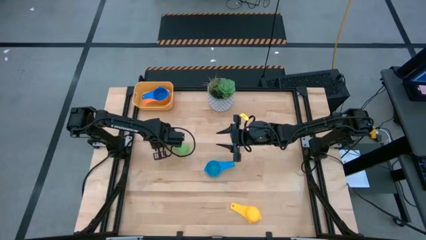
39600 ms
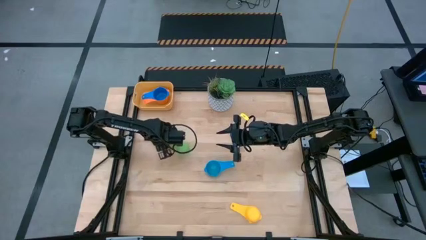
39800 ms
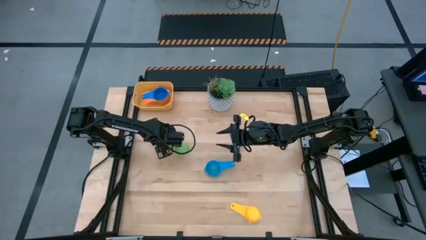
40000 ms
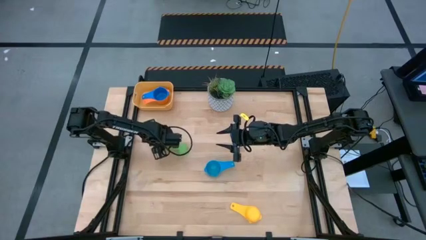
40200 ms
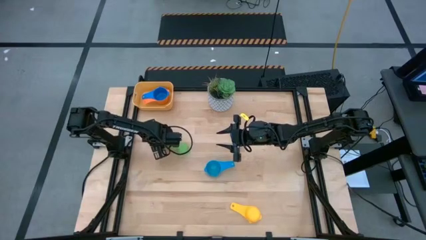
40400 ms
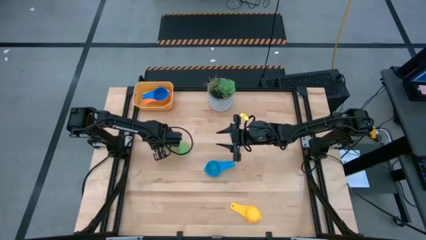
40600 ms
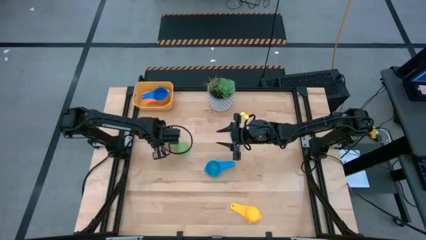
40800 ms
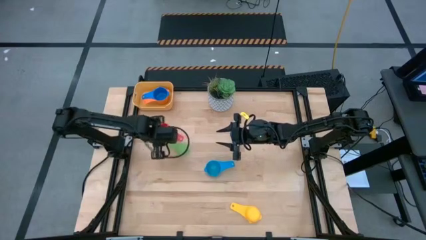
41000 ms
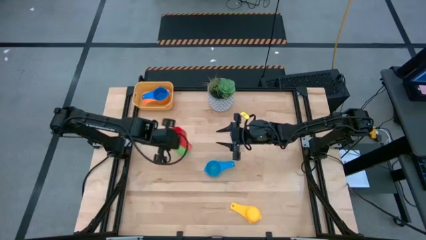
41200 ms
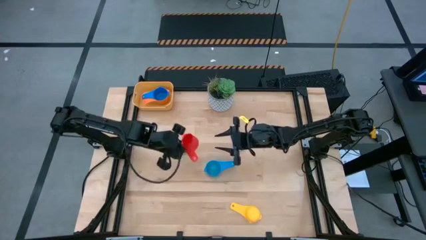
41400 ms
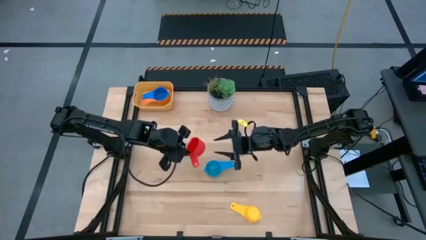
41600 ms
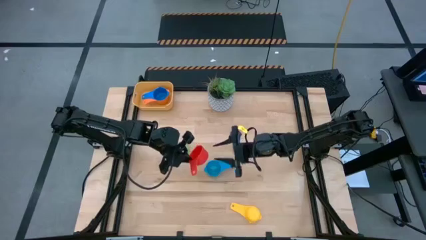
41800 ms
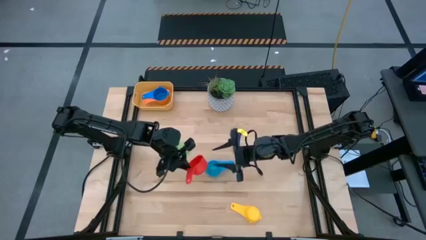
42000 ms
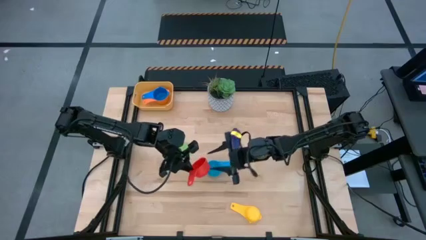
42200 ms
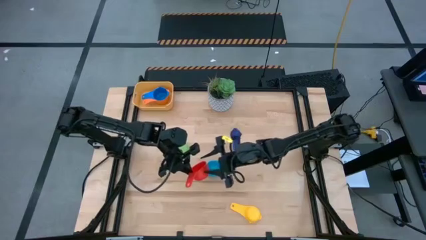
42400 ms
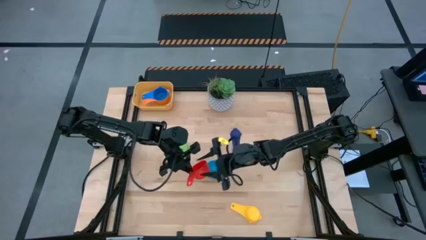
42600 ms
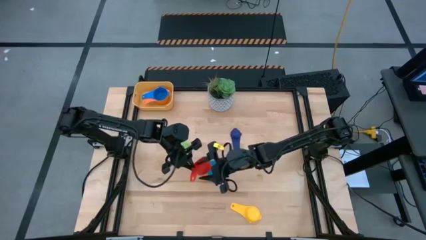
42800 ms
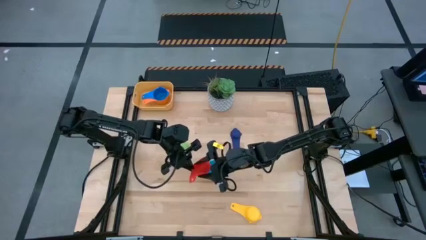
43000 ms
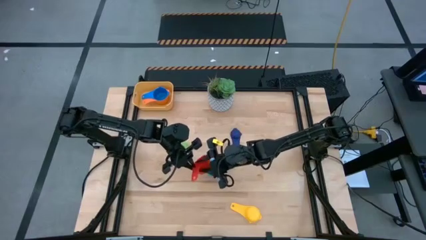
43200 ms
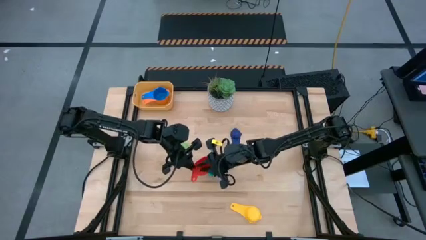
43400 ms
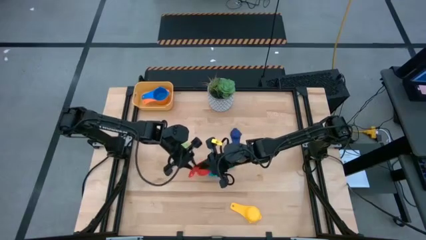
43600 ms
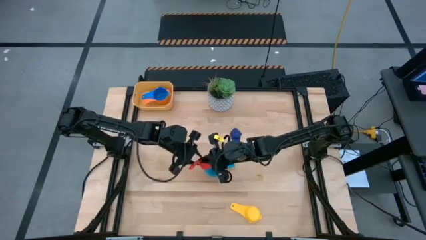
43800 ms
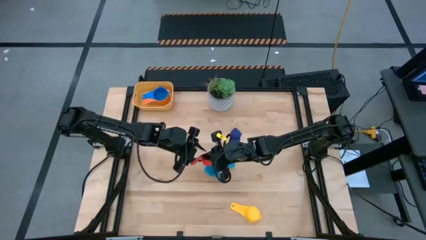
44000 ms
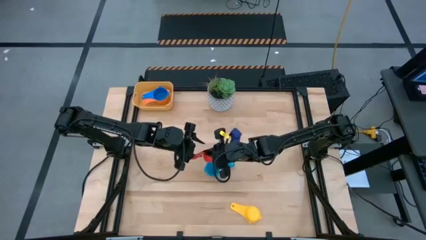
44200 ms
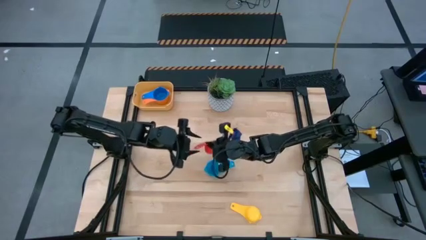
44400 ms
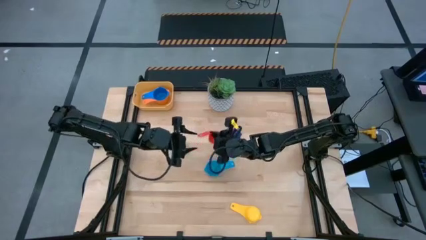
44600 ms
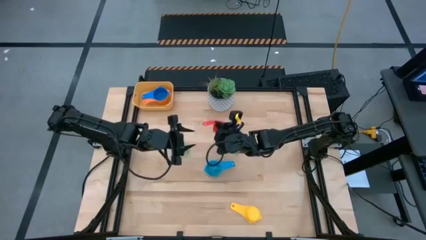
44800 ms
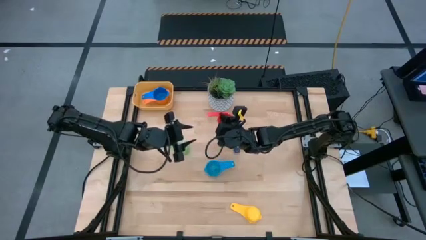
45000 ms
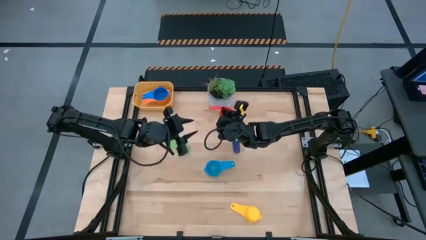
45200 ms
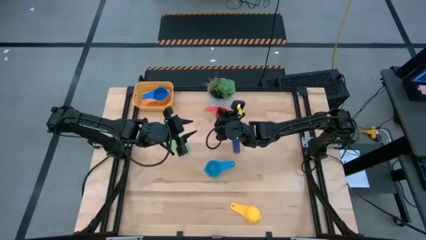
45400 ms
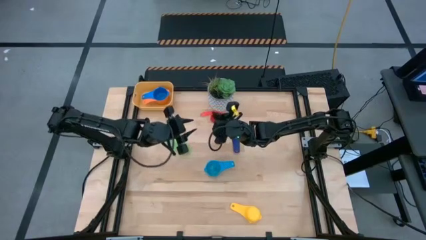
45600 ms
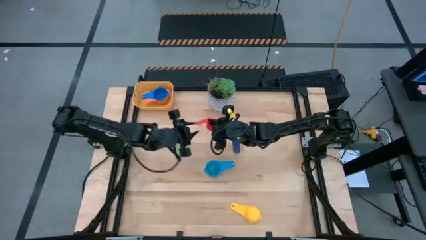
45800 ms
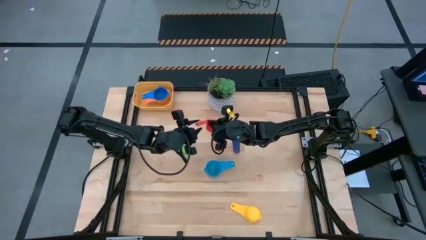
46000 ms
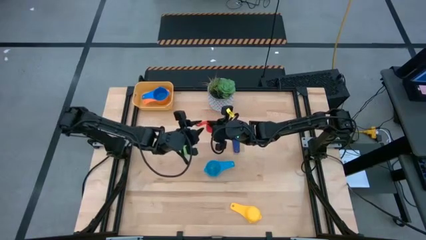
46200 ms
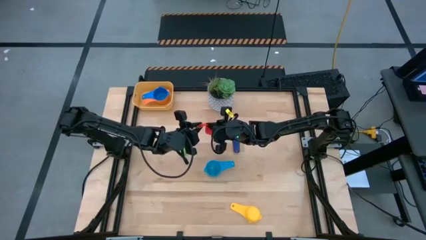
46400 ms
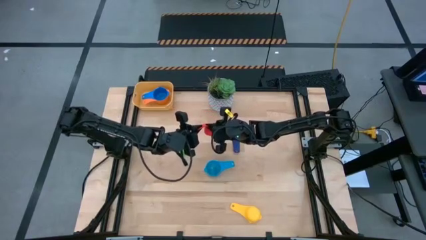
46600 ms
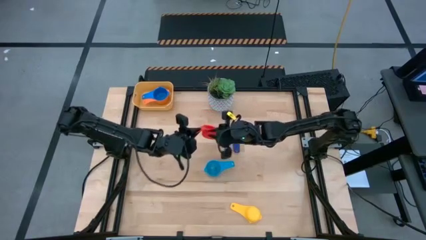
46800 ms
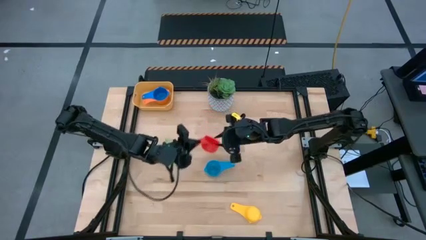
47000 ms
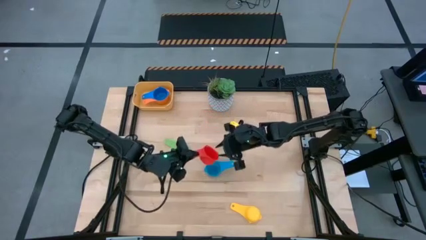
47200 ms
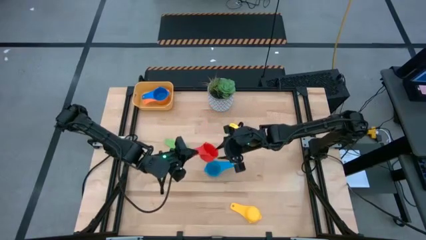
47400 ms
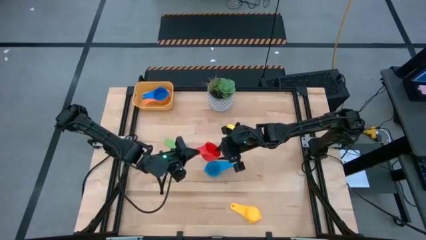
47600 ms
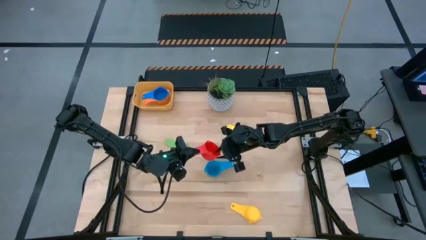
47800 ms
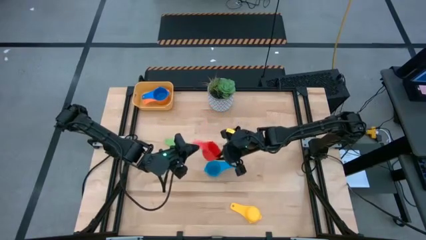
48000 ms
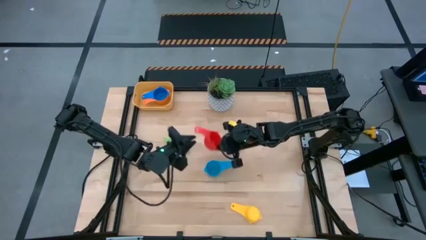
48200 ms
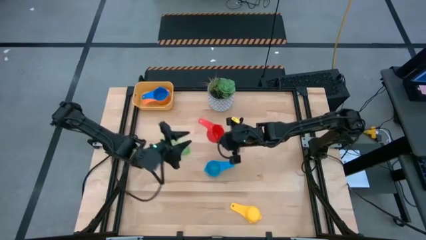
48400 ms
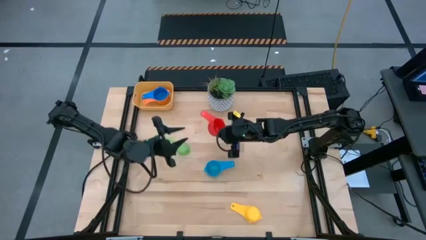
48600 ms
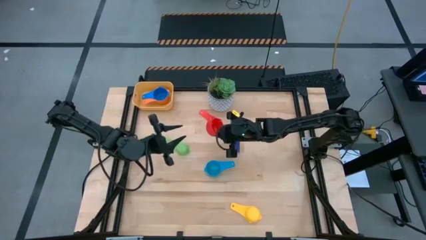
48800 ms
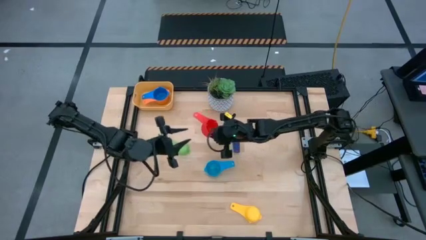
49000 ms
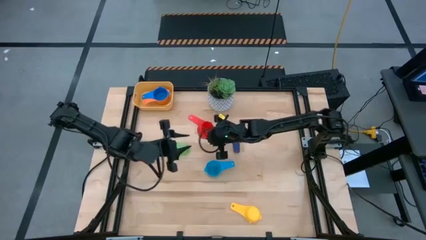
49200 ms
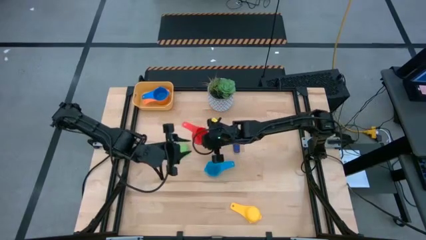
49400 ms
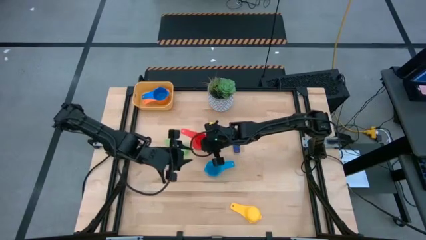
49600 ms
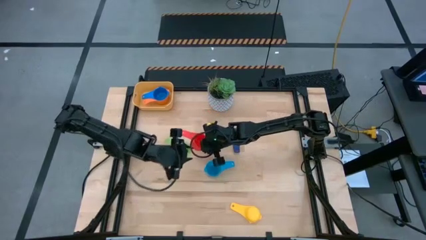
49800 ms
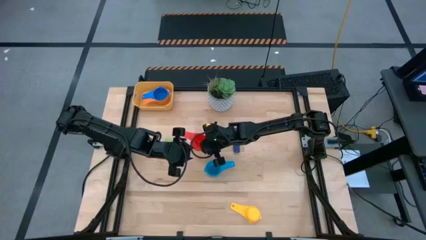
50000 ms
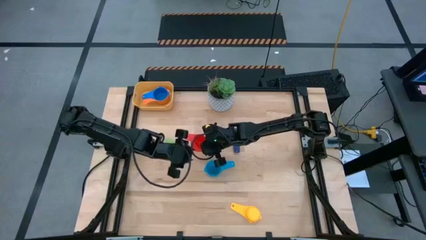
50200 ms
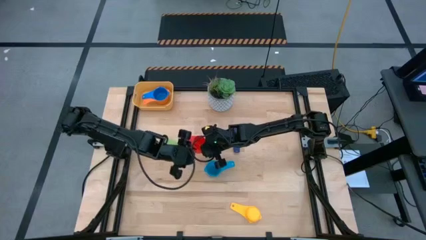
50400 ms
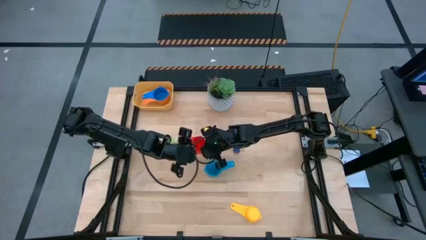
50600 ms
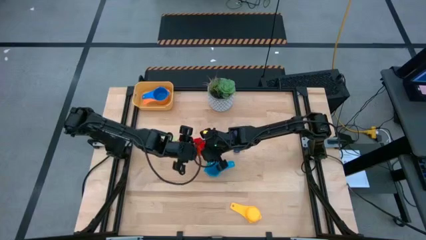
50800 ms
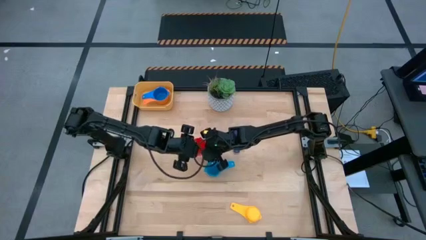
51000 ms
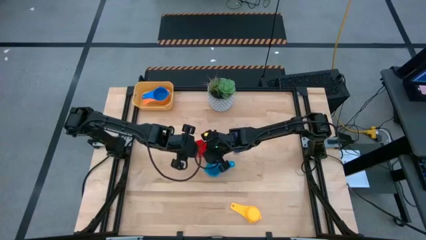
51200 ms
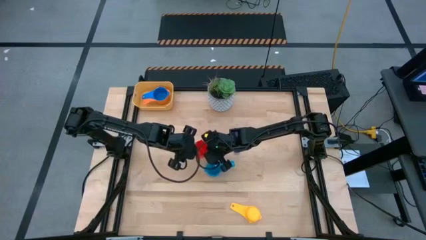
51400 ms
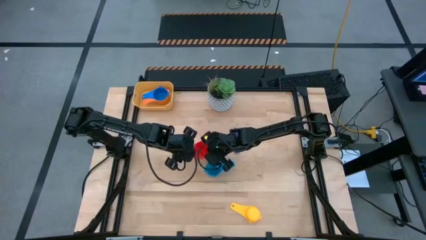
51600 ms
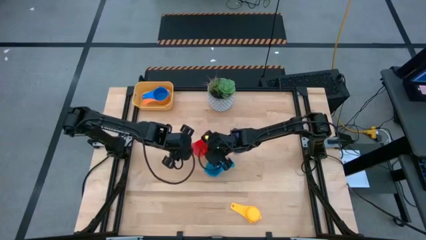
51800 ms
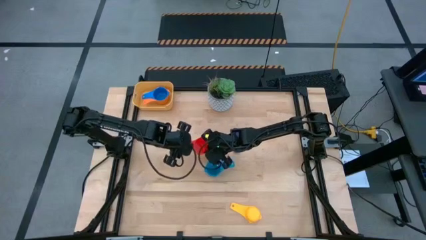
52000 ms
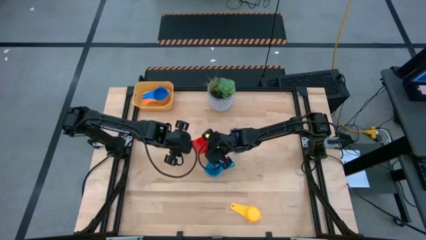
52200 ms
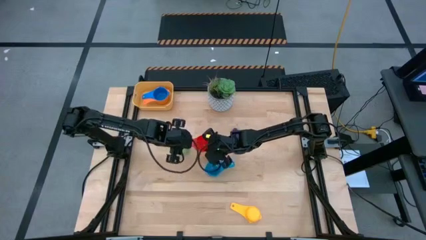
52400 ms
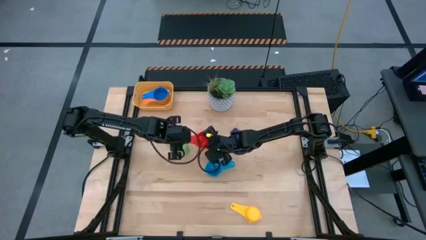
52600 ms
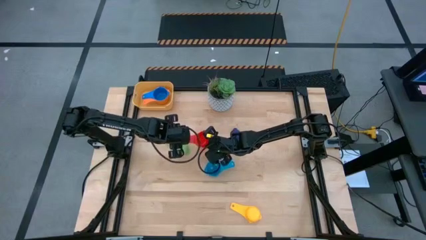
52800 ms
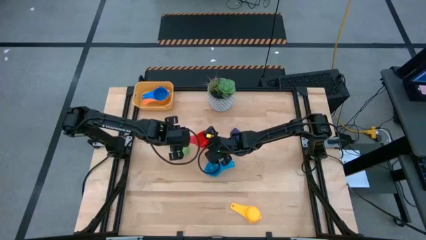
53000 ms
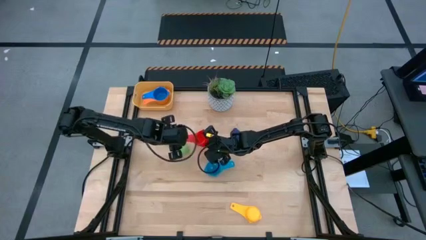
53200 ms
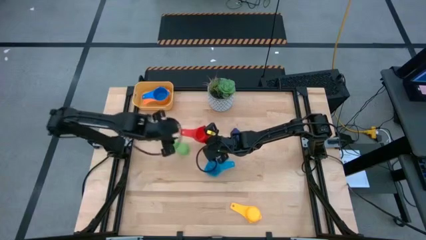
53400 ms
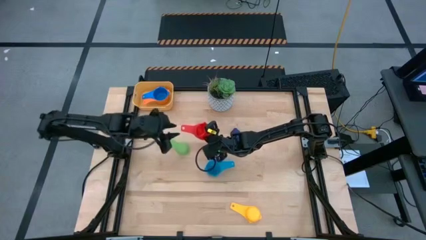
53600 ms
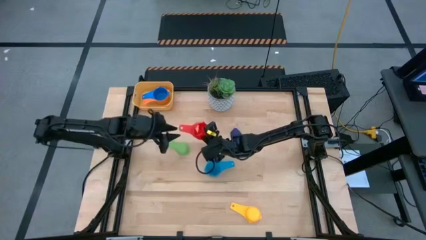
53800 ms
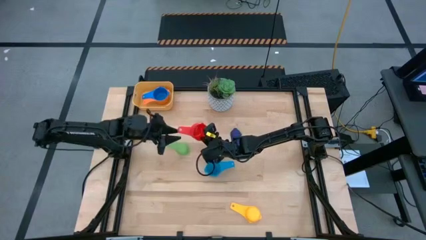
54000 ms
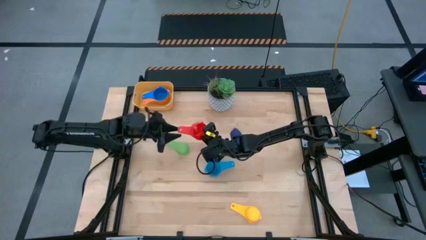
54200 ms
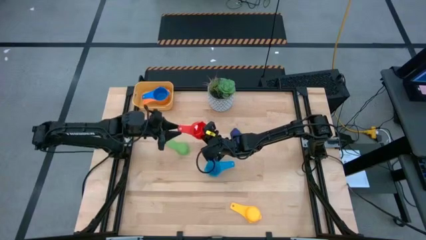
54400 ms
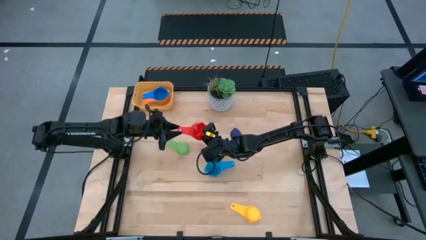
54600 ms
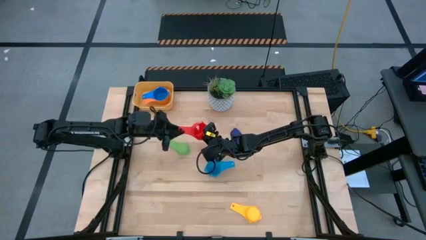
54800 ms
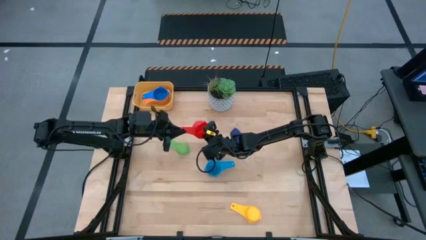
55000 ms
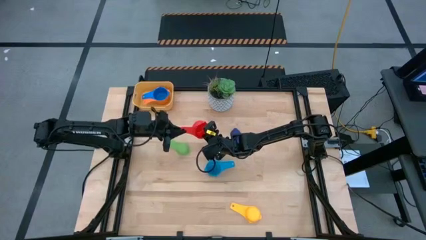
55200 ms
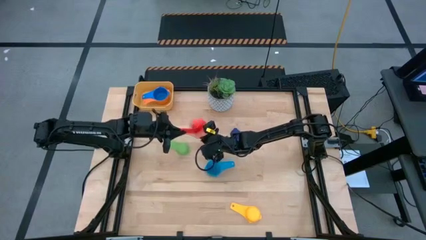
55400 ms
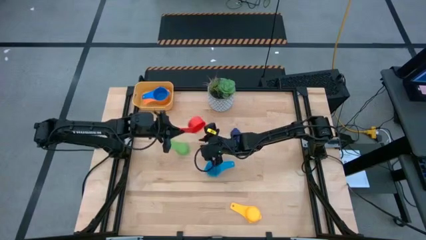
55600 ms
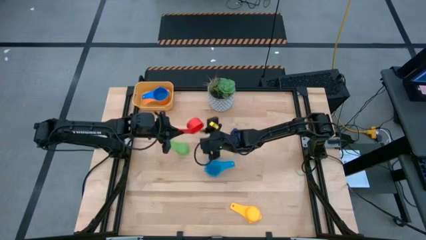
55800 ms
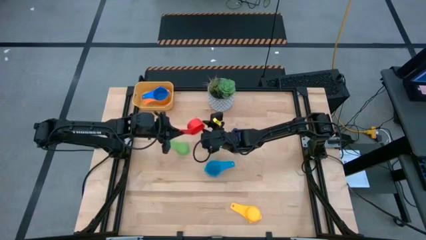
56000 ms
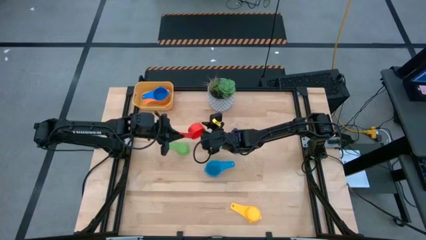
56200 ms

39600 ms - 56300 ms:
Task: Nest measuring cups in basket
Stack the dark orange measuring cup on top of the dark blue measuring cup in the yellow bin
